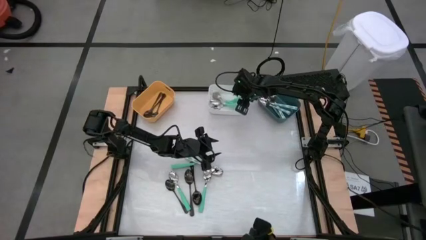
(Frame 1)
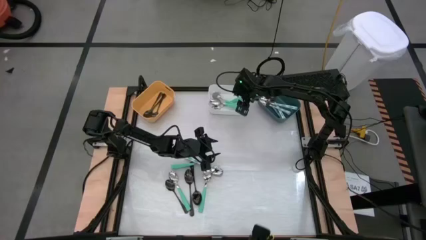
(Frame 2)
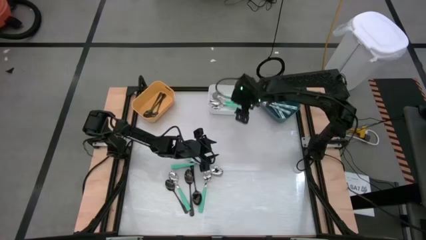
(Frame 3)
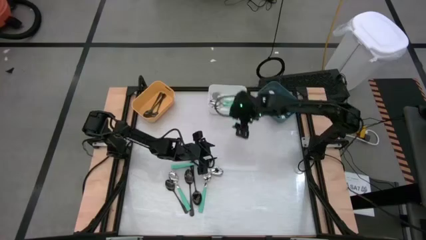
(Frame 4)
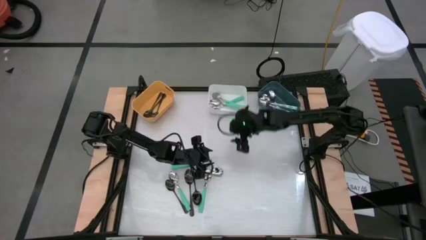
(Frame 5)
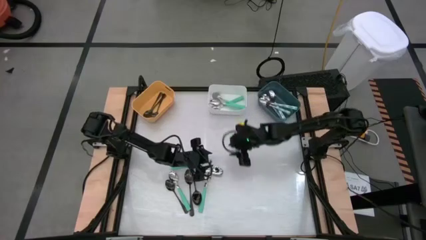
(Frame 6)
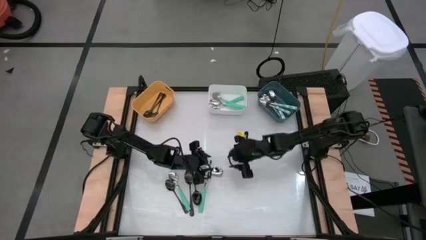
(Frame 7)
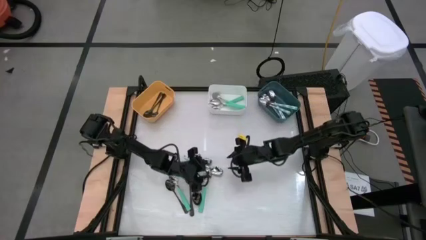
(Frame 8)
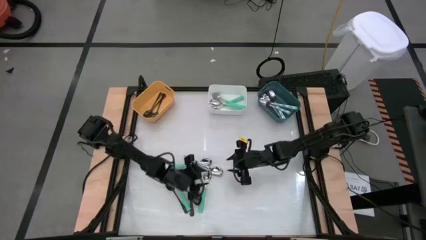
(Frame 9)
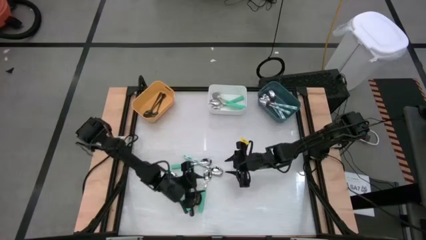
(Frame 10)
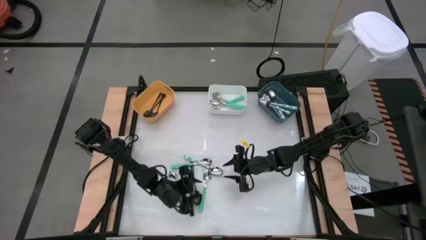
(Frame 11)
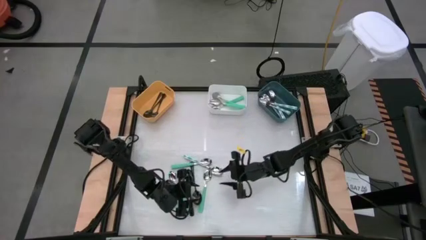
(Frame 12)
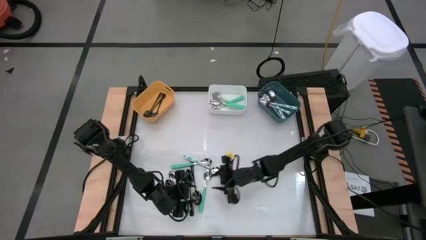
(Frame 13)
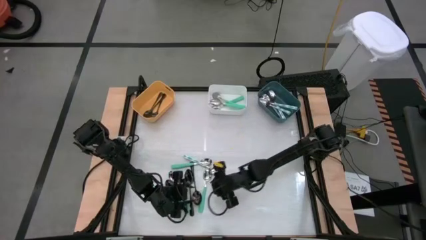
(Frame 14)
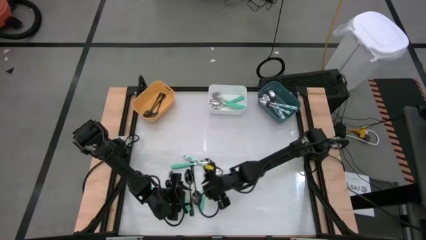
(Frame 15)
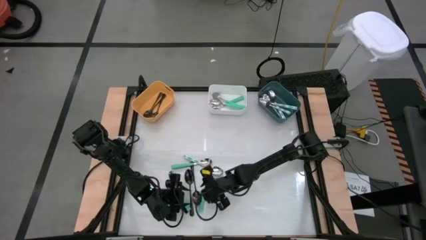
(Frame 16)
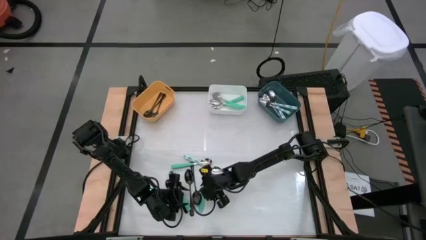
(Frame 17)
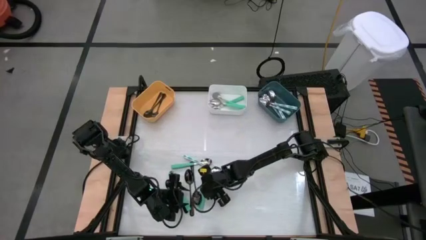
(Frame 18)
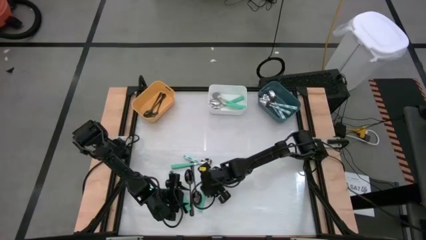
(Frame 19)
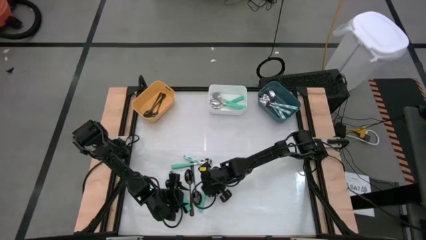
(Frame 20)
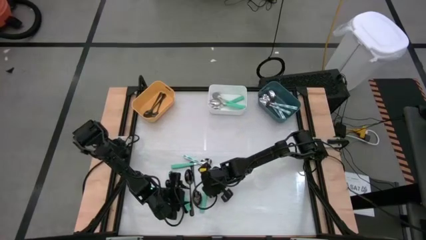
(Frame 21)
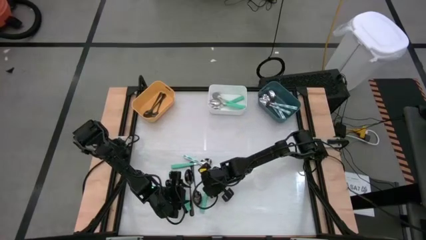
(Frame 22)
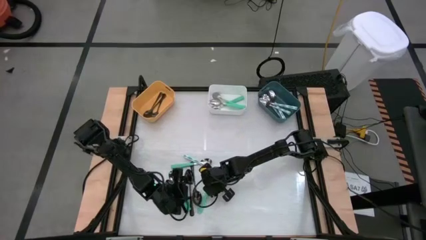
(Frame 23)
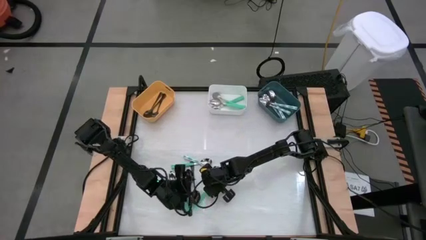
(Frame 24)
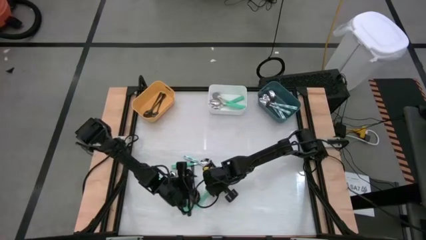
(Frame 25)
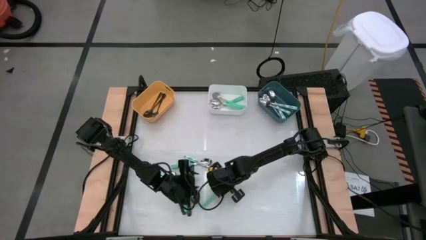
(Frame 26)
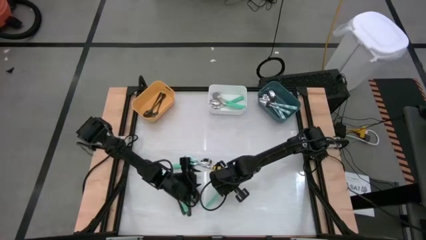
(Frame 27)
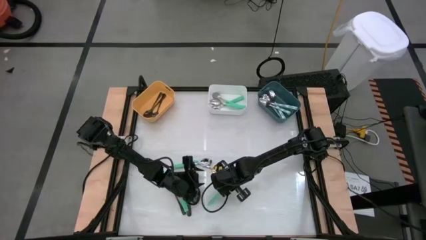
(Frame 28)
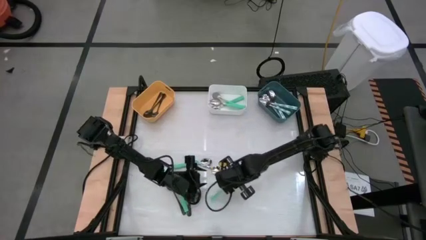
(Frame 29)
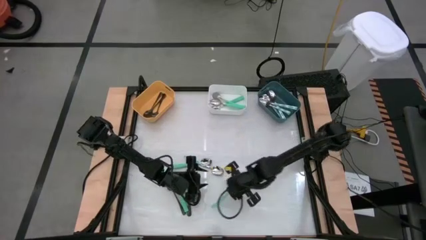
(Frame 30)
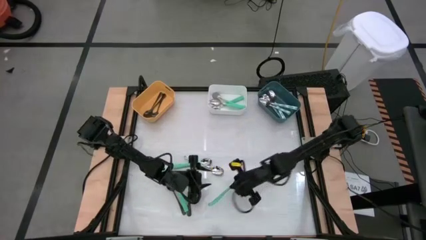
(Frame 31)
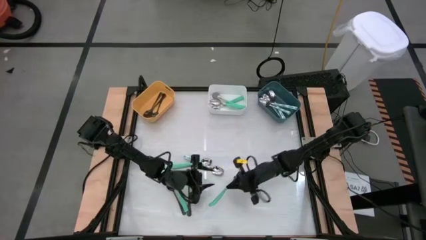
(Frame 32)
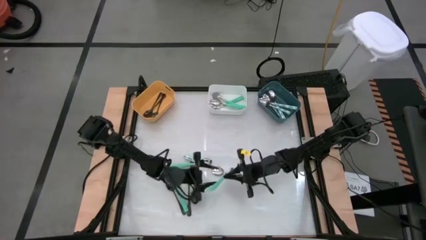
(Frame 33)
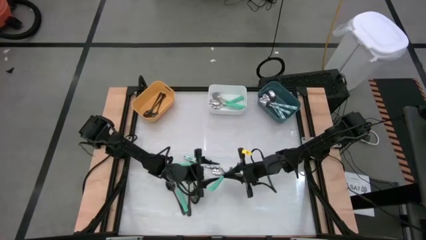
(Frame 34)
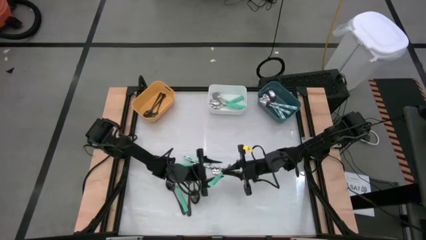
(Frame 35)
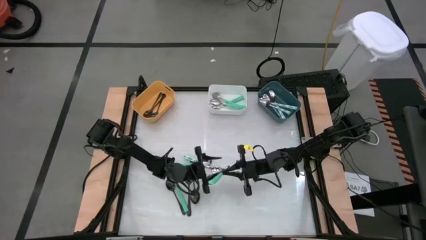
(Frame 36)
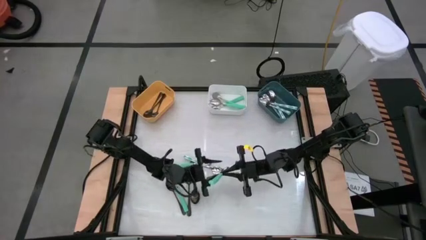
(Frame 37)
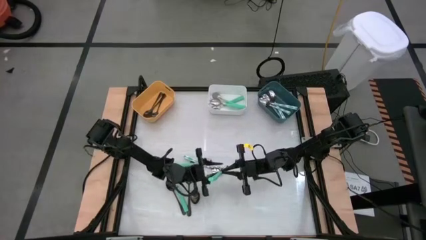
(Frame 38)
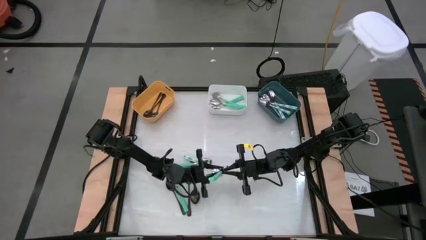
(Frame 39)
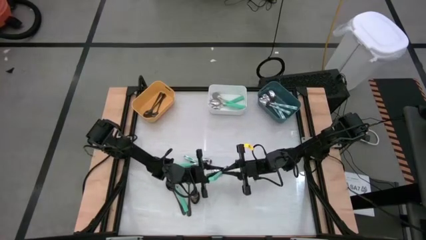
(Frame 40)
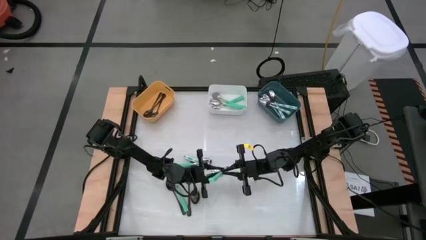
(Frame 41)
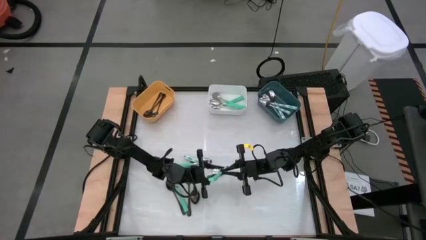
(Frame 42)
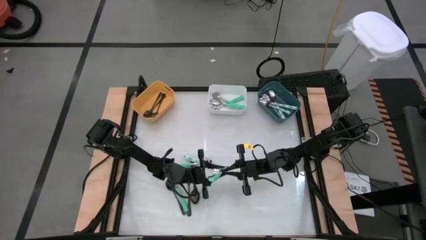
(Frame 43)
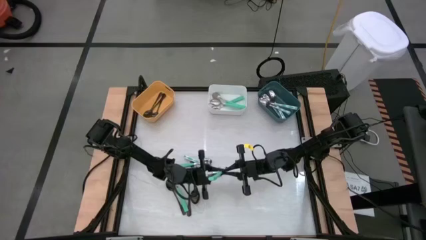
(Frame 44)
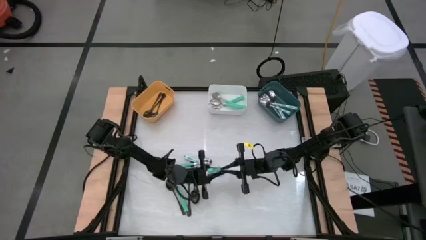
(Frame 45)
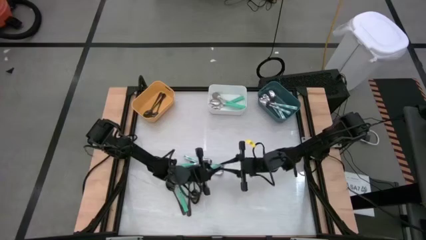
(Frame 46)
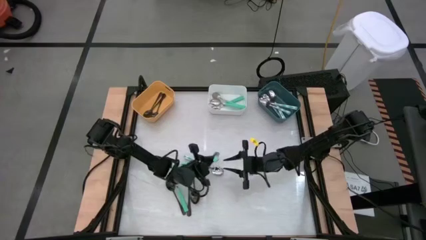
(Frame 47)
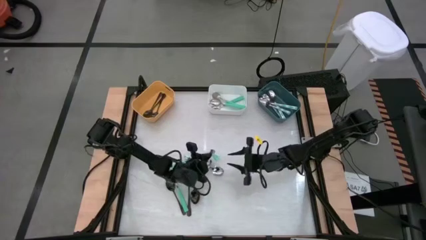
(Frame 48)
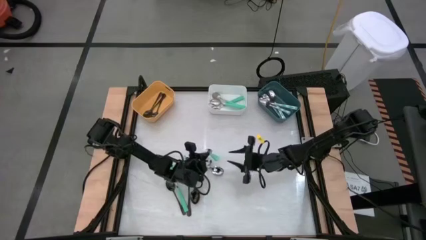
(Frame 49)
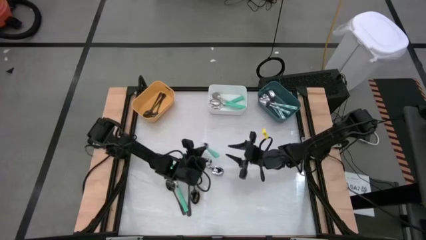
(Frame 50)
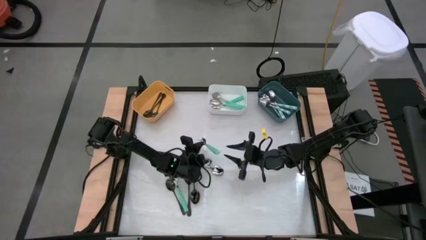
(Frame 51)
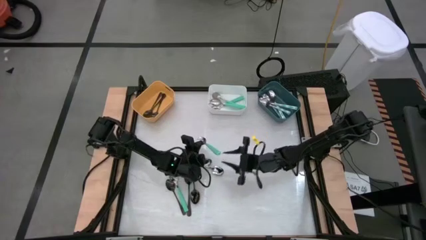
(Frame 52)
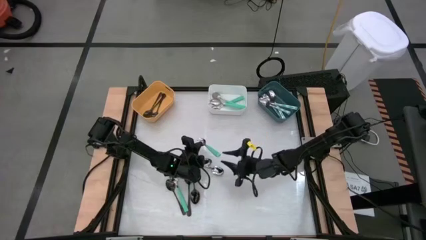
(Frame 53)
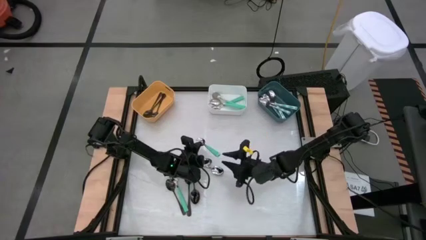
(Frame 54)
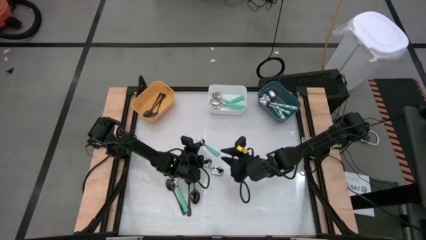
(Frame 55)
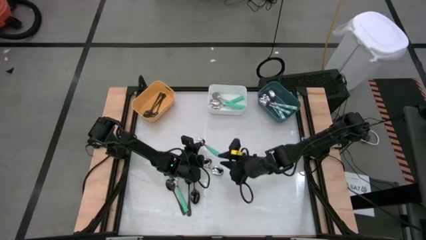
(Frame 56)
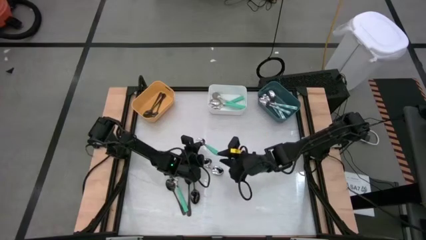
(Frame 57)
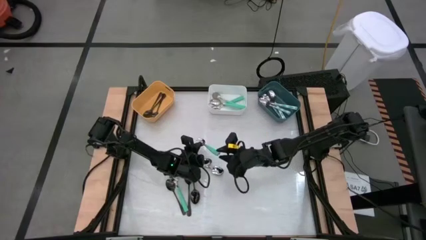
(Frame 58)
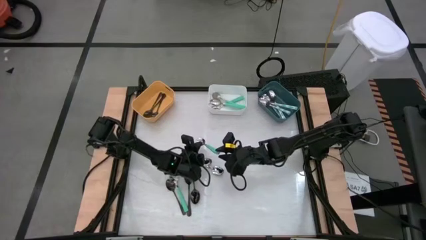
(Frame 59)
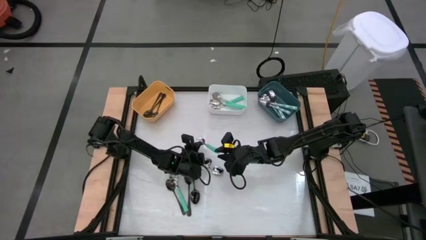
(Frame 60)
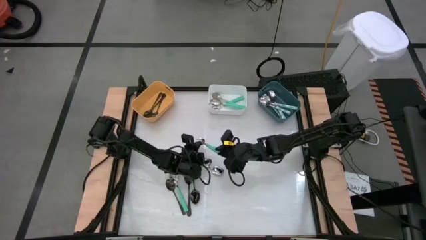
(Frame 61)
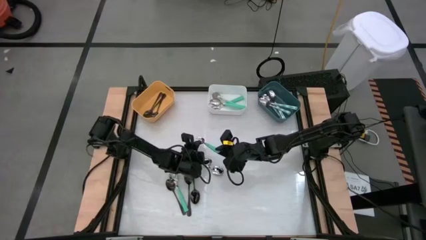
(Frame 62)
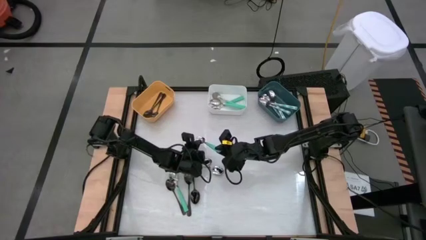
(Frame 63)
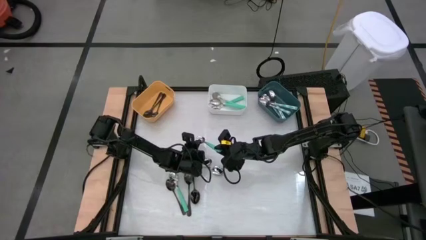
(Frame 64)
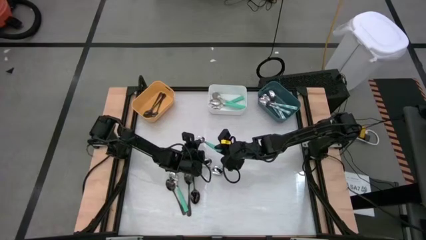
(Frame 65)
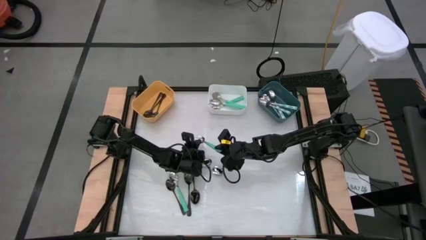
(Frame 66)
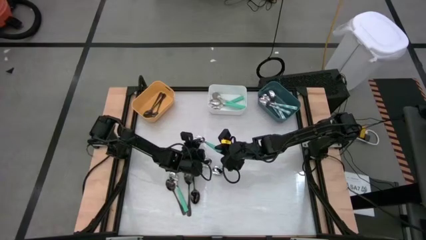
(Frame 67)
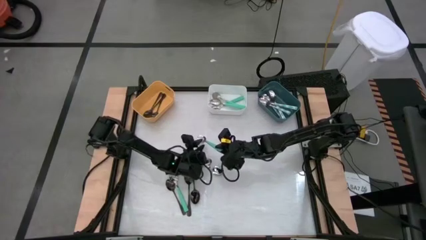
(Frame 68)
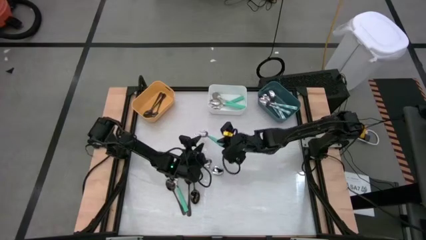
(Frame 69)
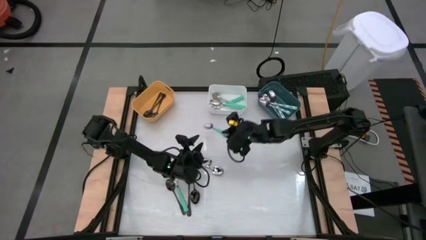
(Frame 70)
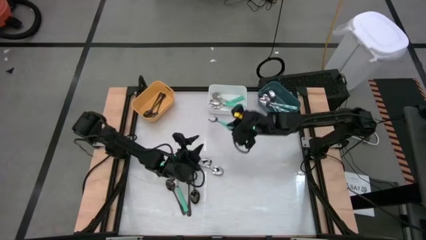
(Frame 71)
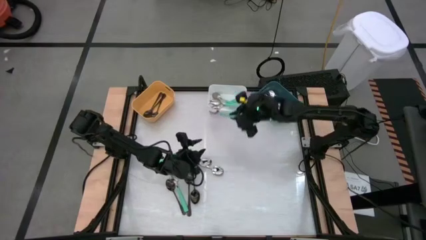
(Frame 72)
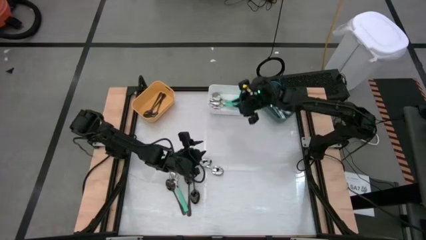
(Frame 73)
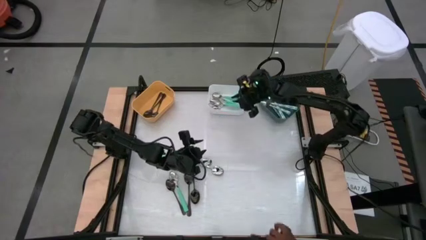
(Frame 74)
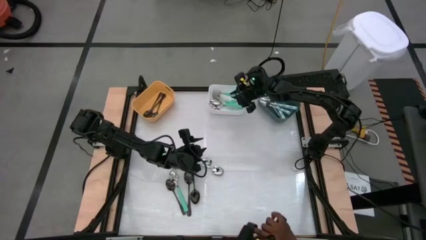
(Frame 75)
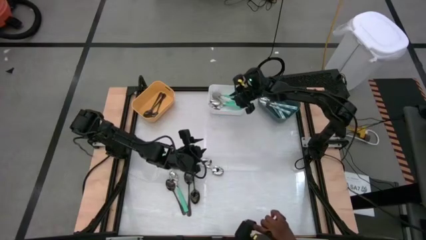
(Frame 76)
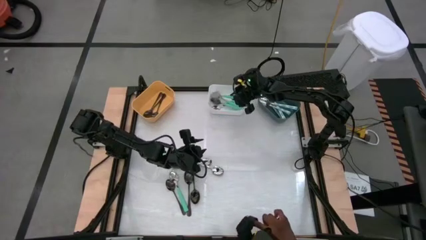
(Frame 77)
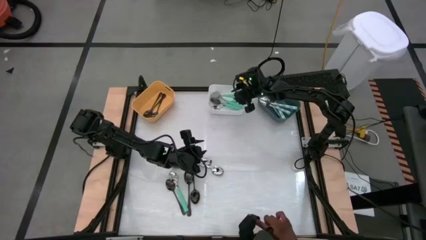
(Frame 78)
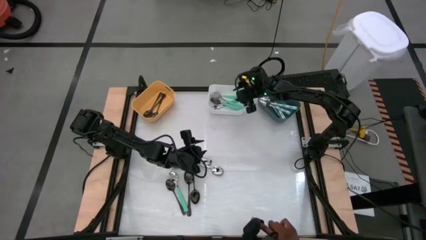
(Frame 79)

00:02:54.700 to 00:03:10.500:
Task: Sort silverware by color (type)
Put the blue spoon into the white bin

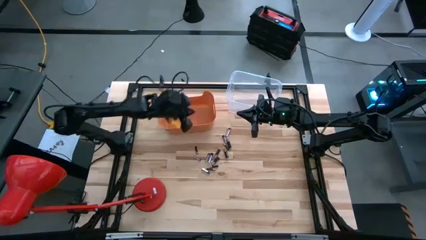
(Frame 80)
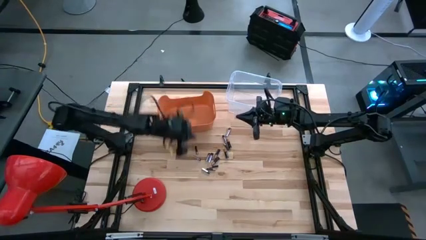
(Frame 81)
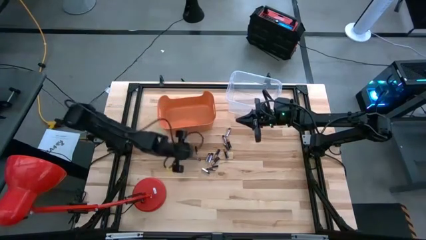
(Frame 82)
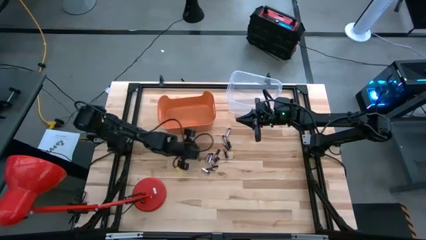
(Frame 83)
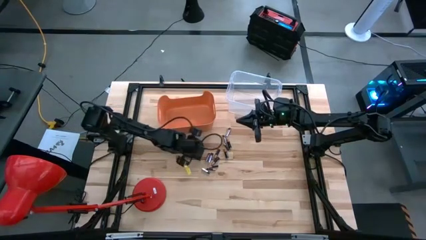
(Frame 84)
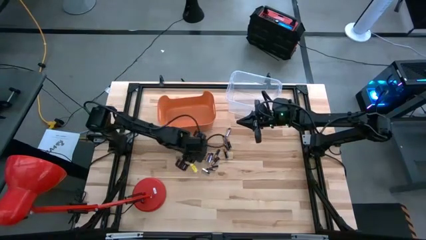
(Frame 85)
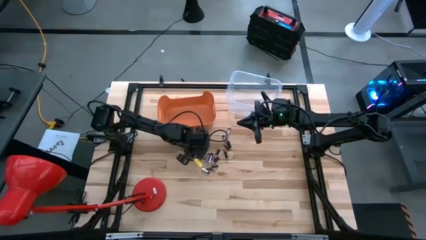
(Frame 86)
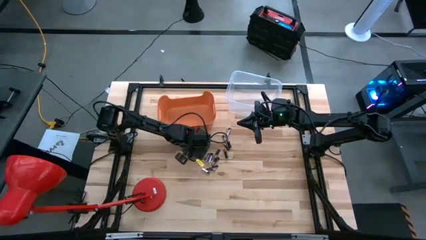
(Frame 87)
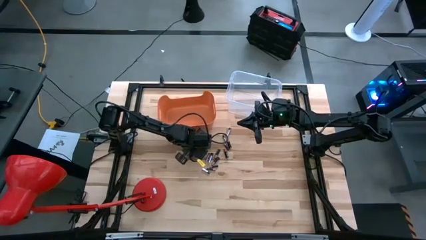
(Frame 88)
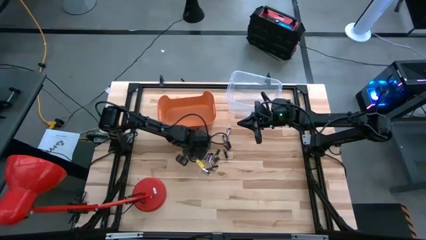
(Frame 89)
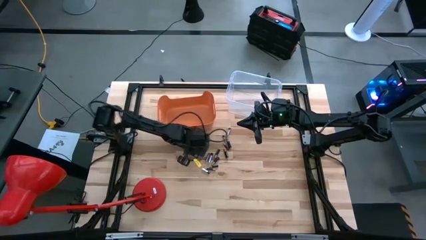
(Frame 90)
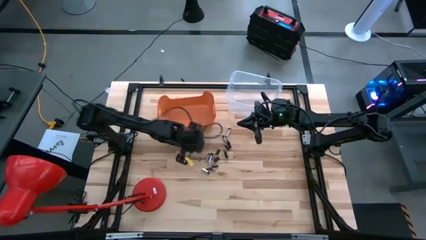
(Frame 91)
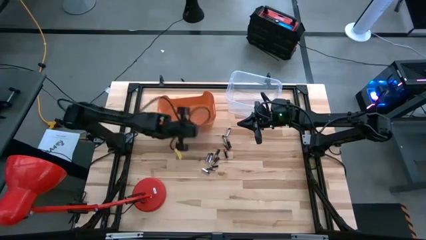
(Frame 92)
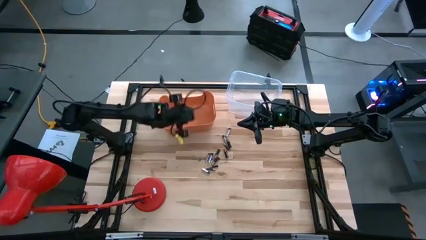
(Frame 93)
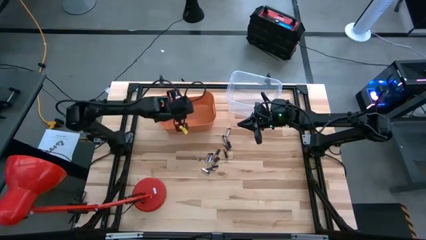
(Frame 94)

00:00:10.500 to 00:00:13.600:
Task: Sort batteries
Put the black battery into the orange bin
